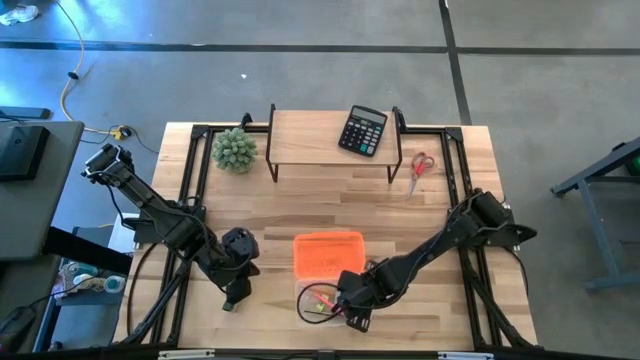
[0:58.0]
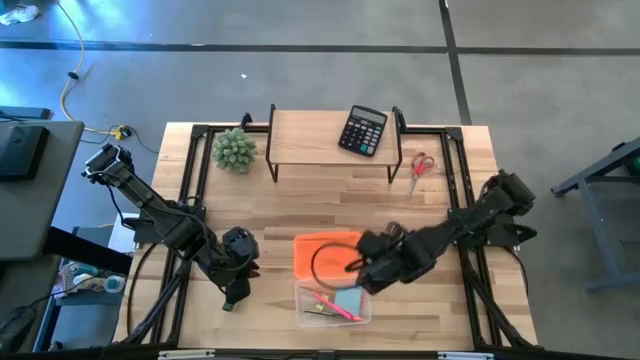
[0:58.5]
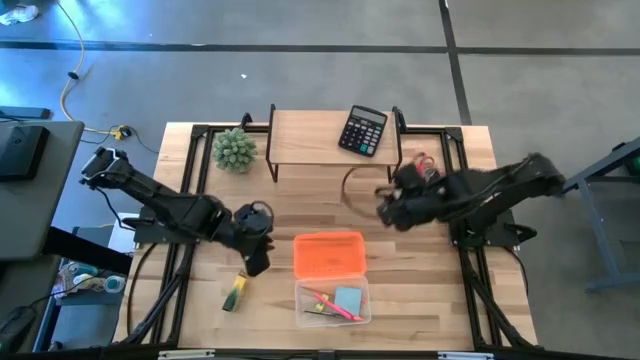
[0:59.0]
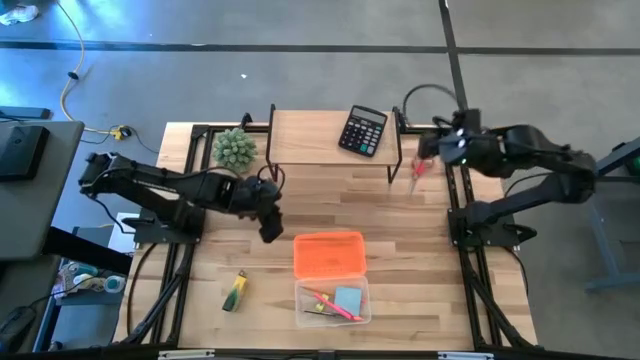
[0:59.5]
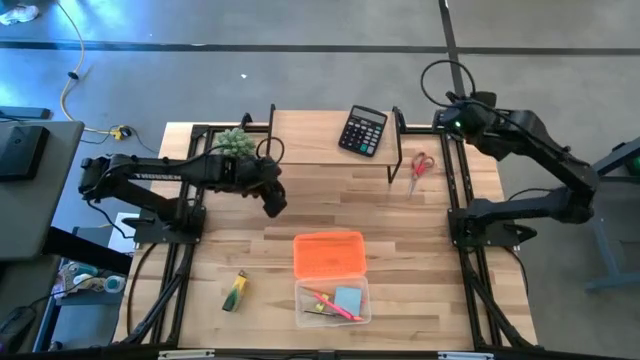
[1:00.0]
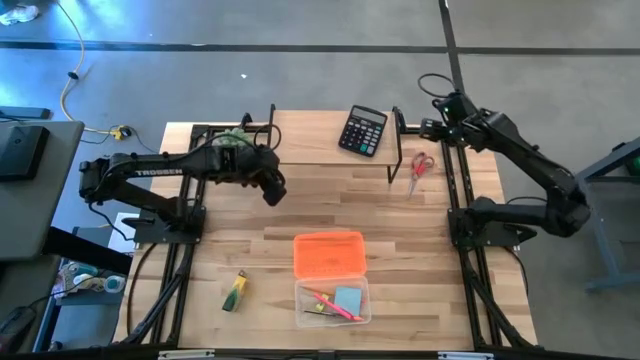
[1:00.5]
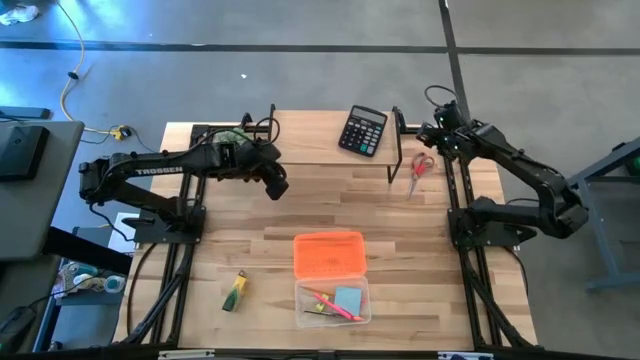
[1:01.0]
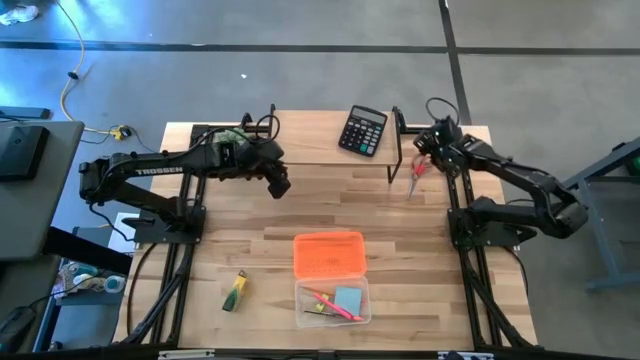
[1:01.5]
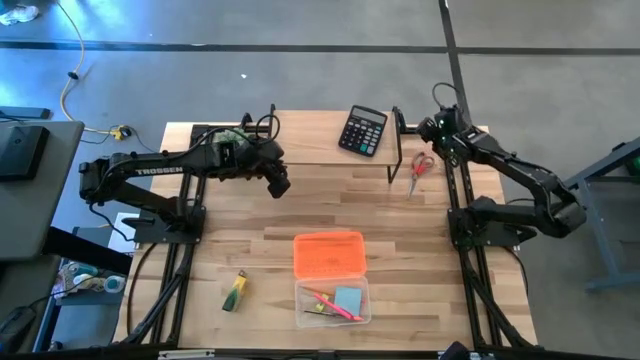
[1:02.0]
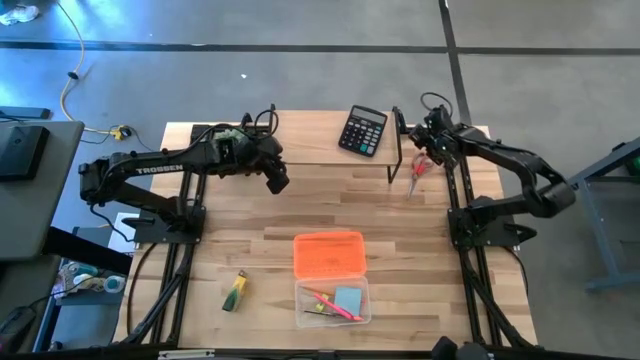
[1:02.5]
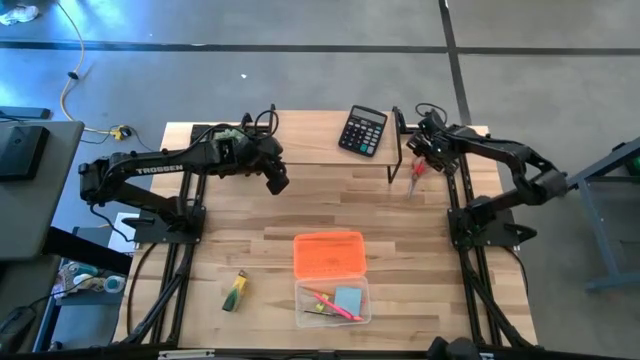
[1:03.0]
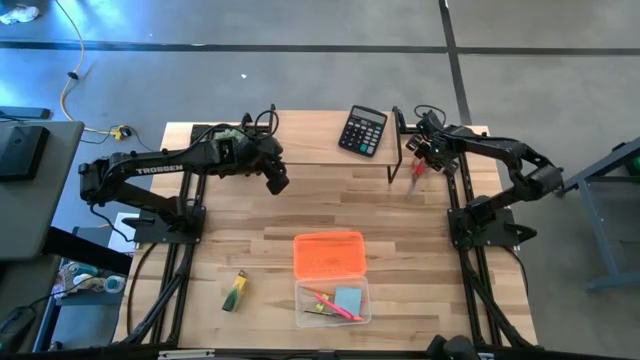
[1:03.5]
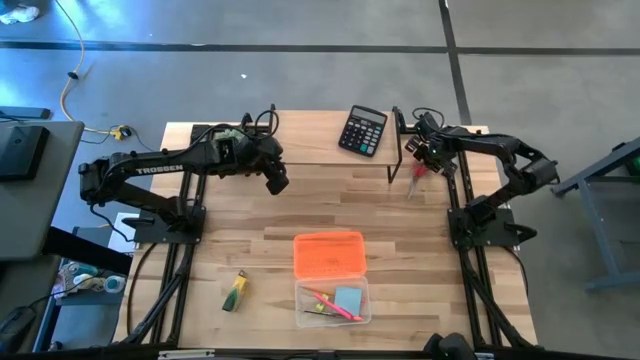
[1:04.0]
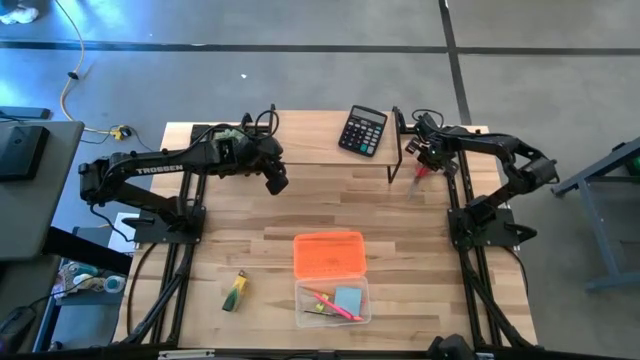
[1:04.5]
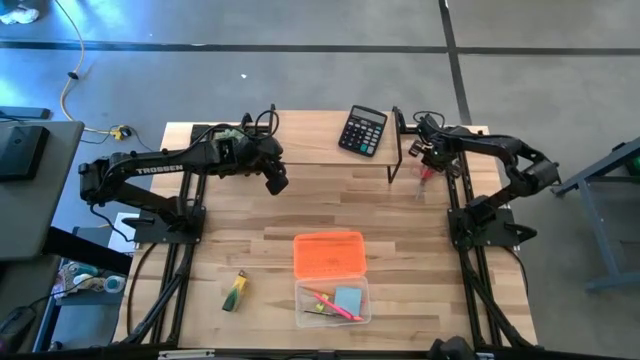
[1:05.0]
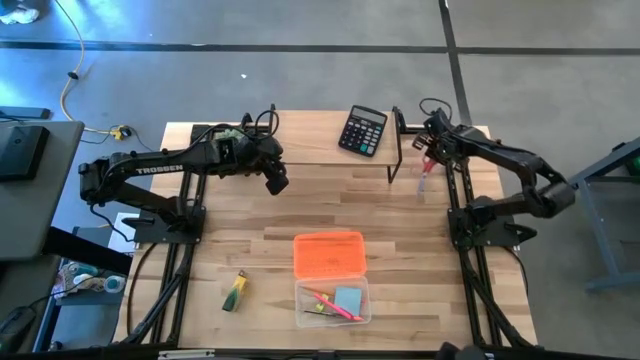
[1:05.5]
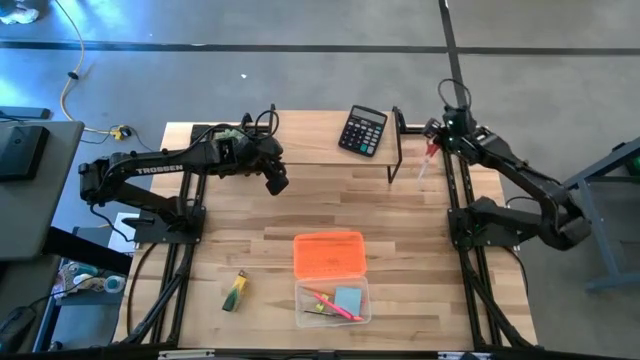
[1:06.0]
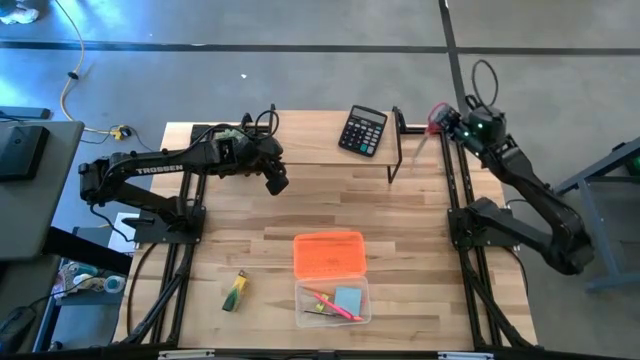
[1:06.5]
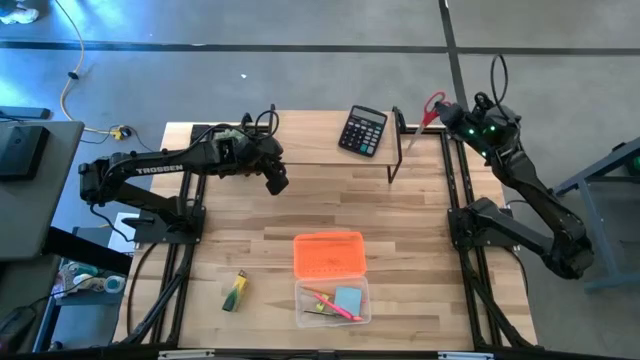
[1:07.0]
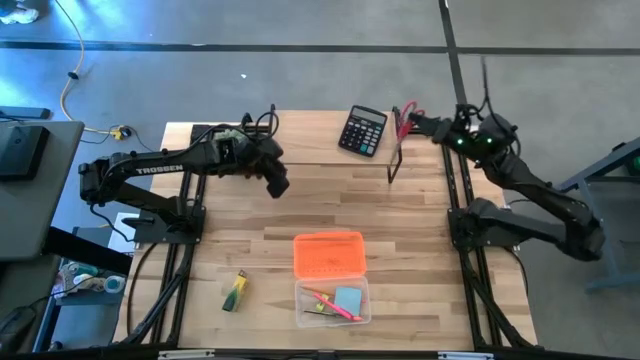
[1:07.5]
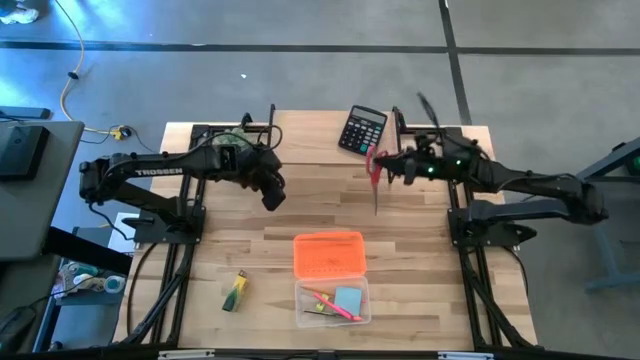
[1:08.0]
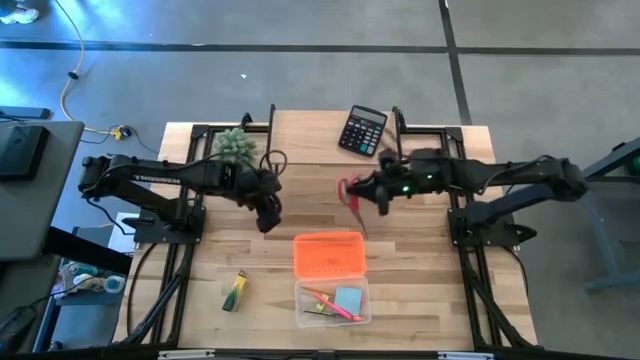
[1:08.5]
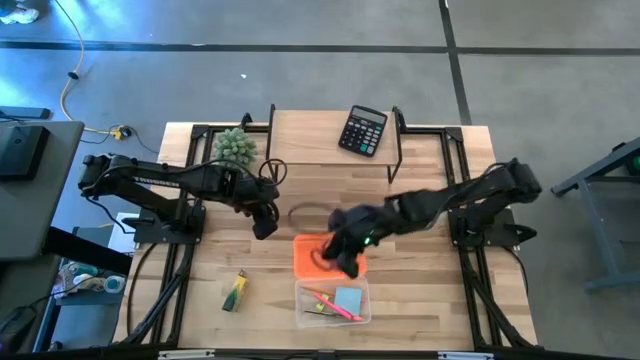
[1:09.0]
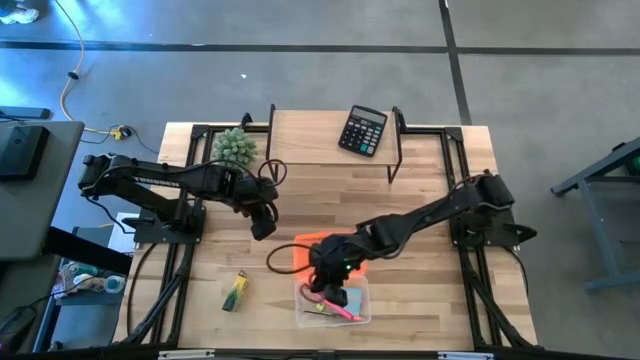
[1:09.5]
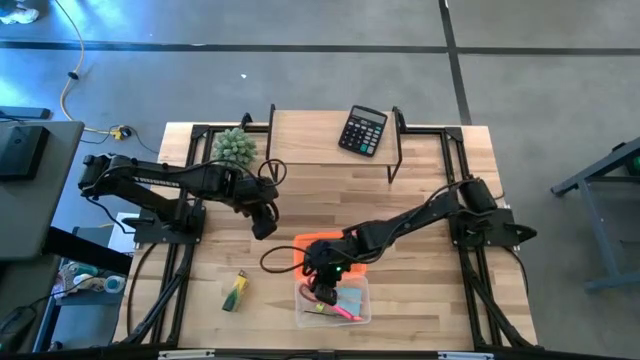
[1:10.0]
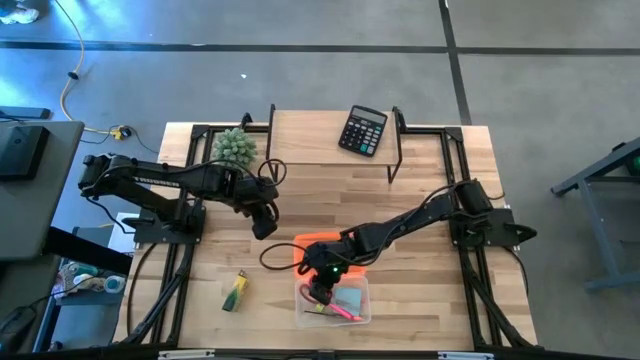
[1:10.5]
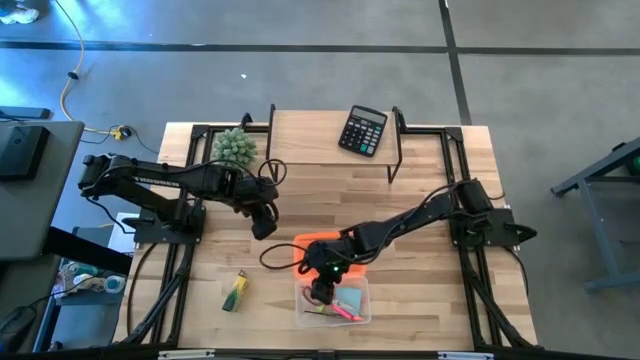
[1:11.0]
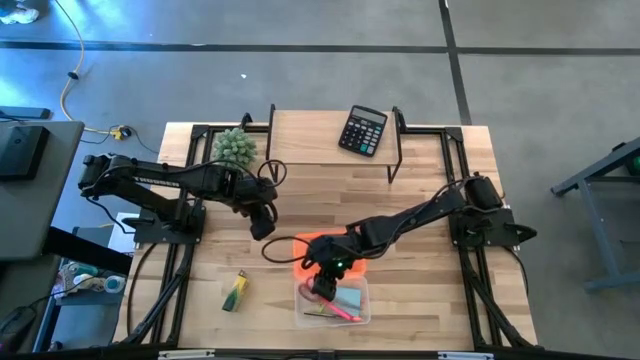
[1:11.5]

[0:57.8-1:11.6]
Task: Pack school essentials
Put the red scissors into the orange supply box

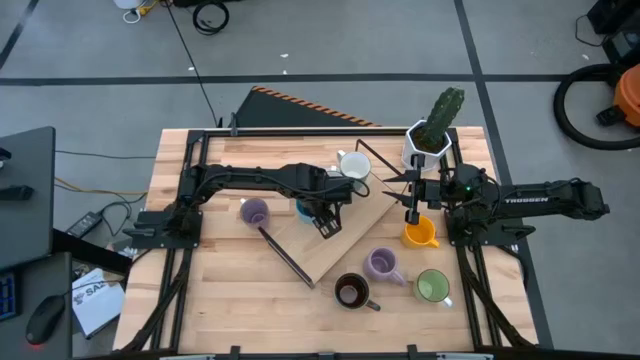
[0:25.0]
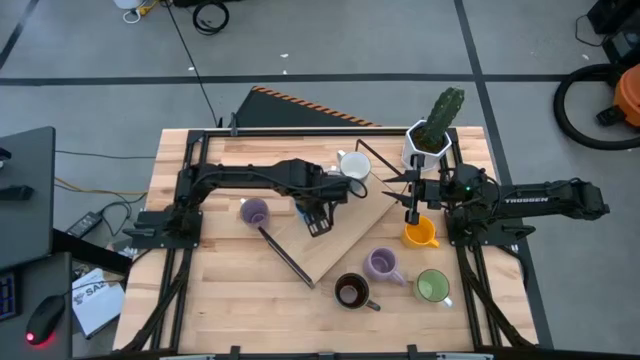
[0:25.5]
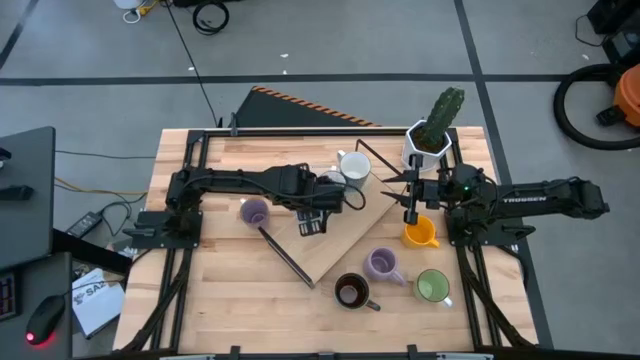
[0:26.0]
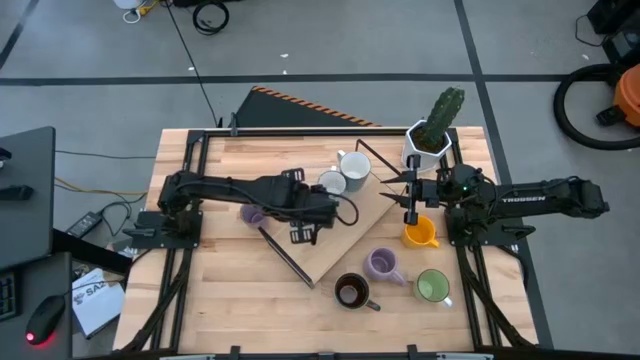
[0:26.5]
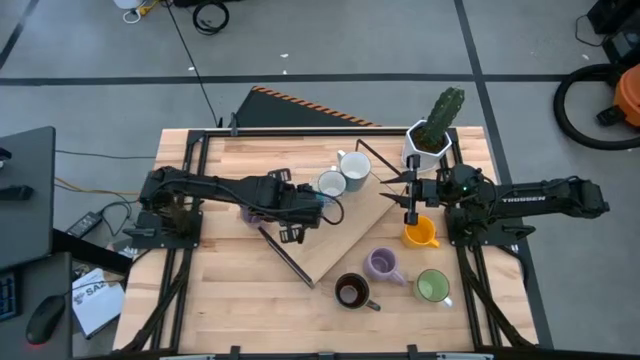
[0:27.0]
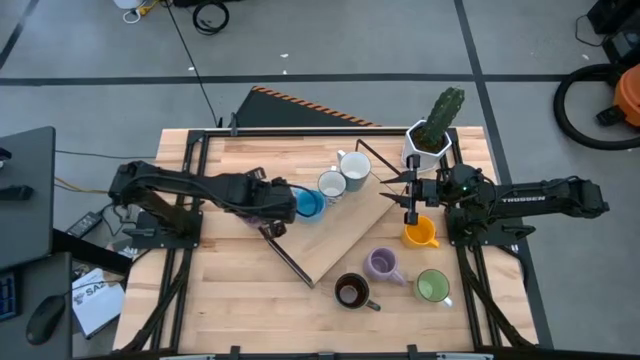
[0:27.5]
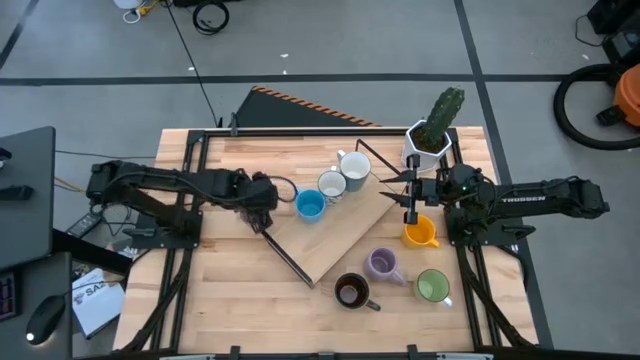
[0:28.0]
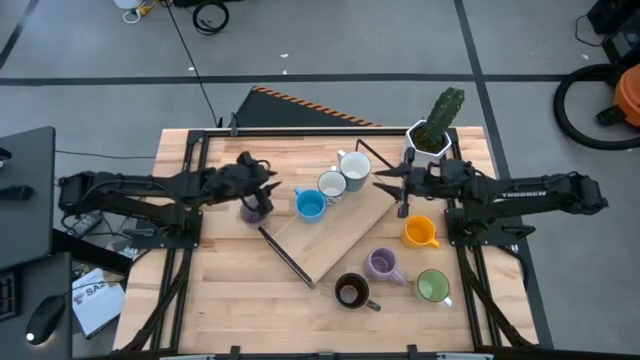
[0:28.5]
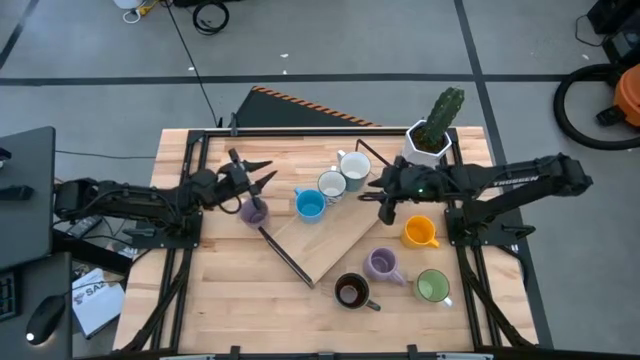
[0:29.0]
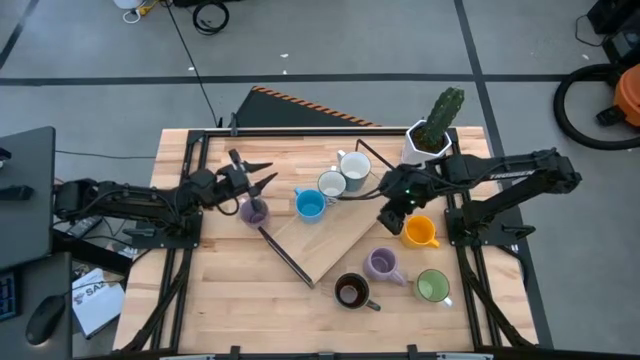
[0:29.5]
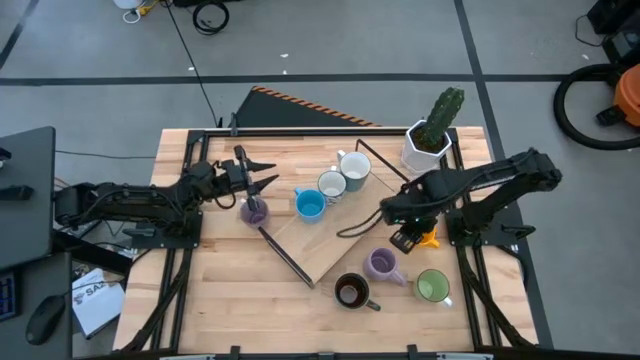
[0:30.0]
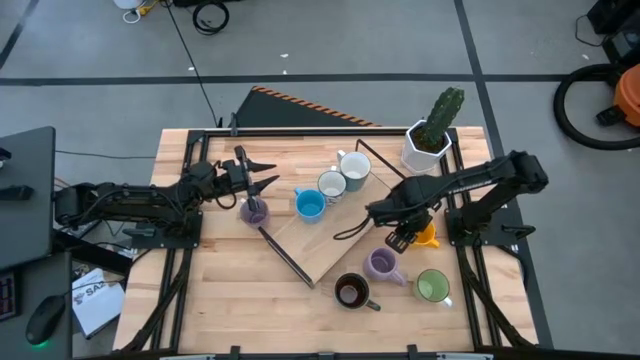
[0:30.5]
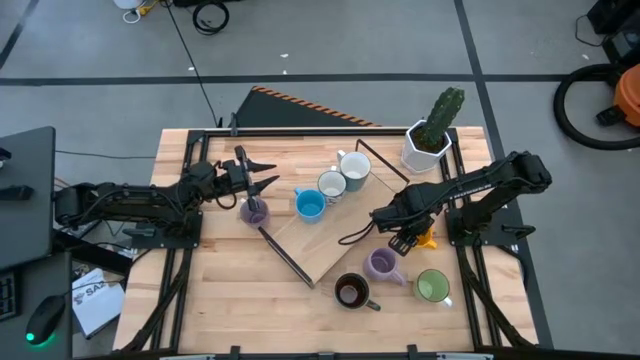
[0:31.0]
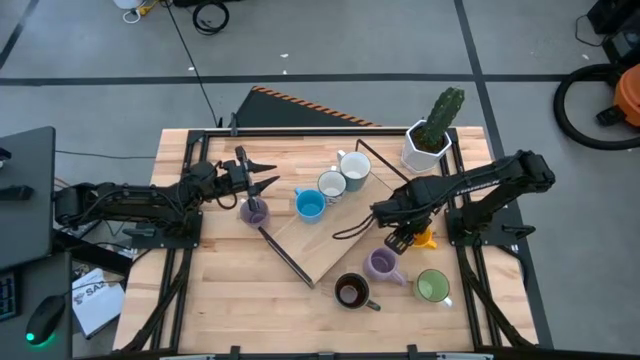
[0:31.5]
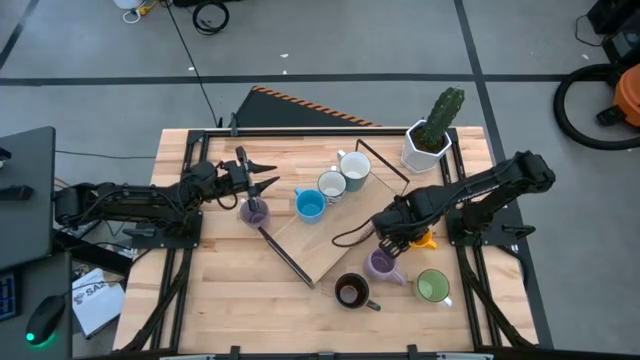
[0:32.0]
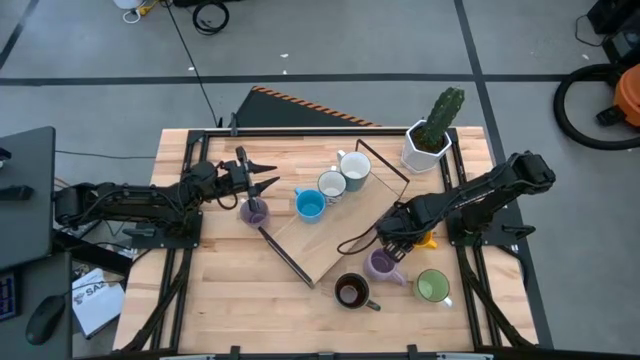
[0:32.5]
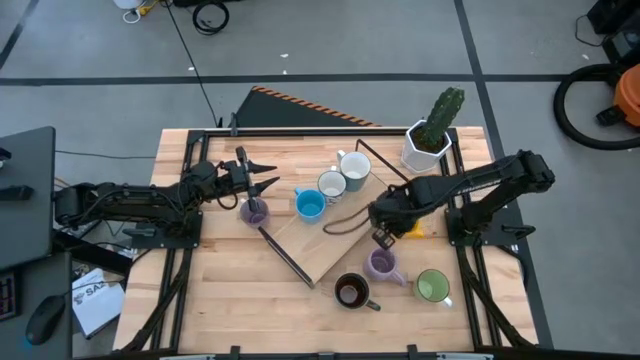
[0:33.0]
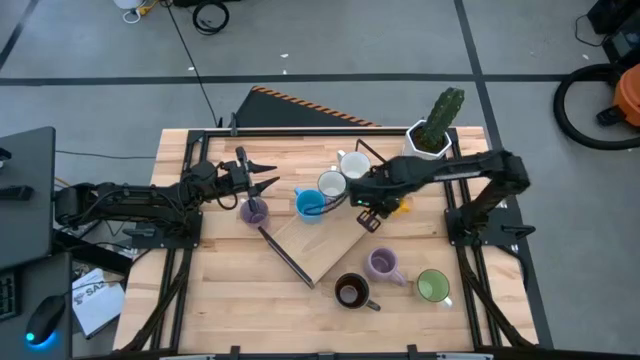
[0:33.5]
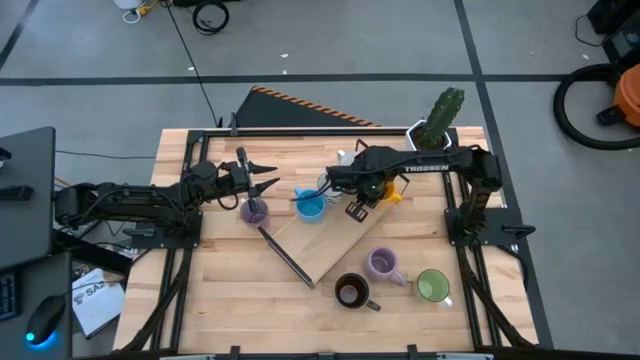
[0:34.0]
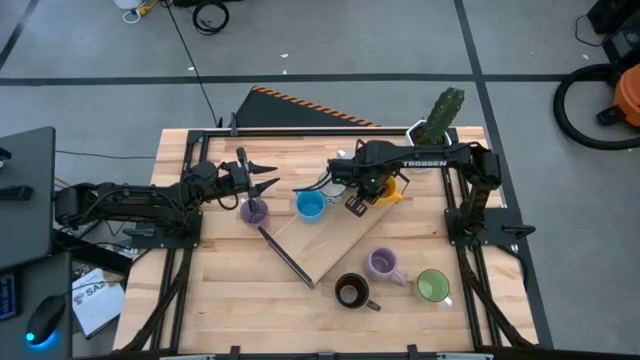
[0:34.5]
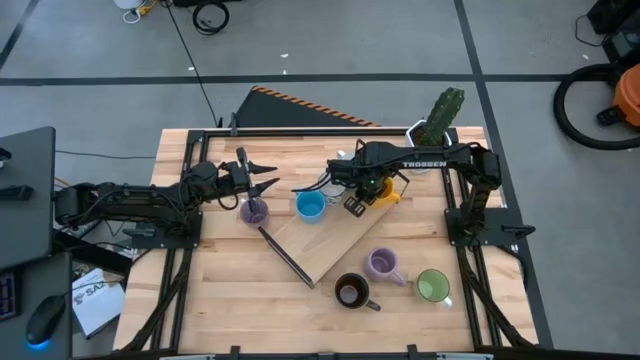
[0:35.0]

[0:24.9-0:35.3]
Task: Place coffee mugs
Put the yellow mug on the shelf
